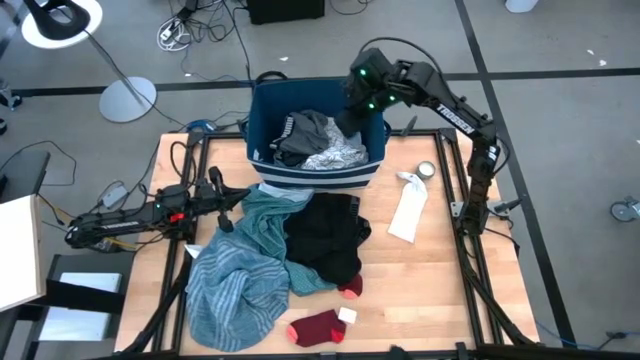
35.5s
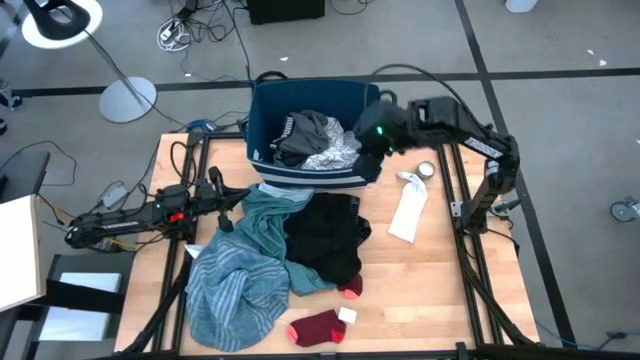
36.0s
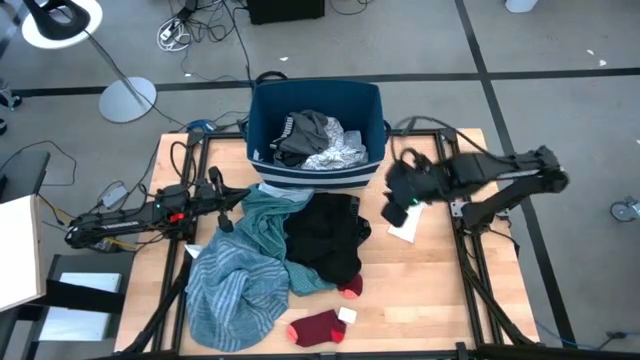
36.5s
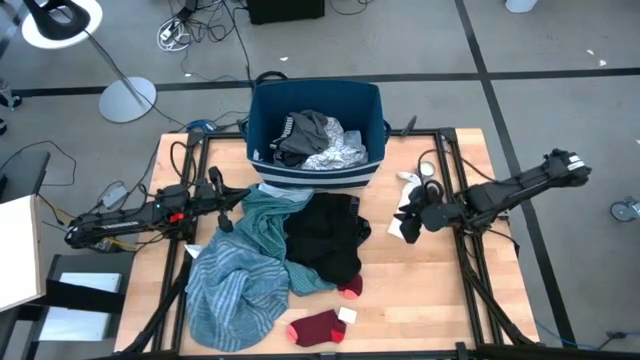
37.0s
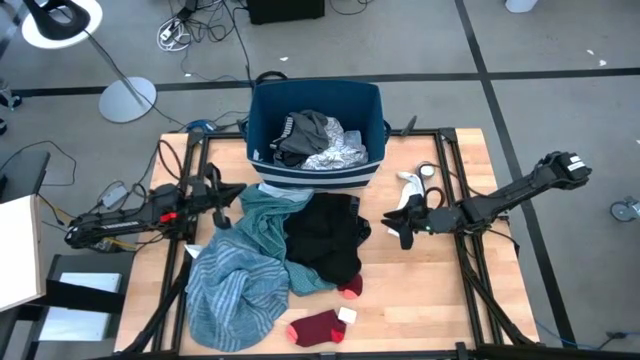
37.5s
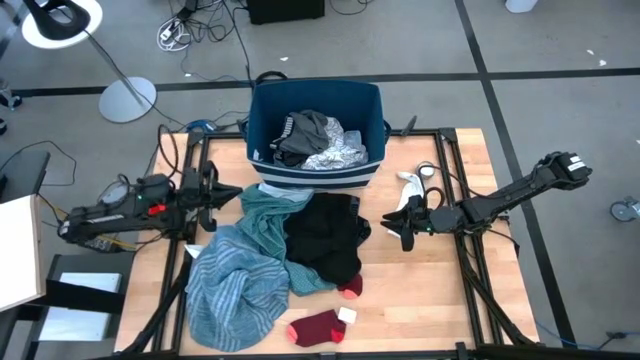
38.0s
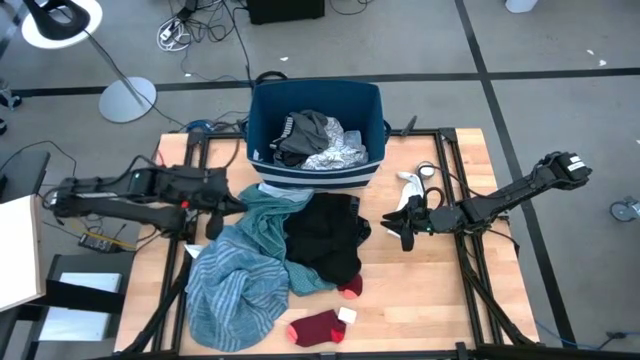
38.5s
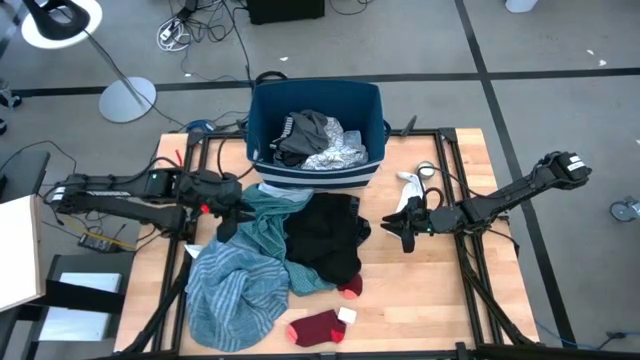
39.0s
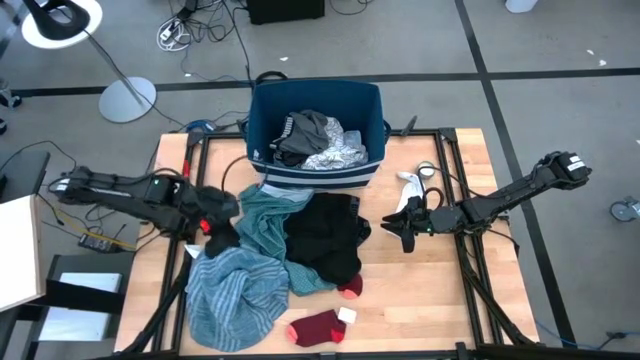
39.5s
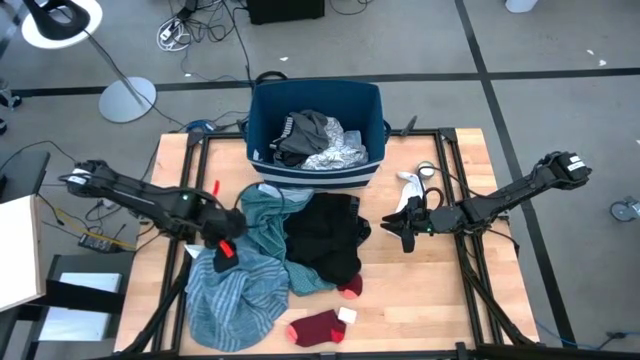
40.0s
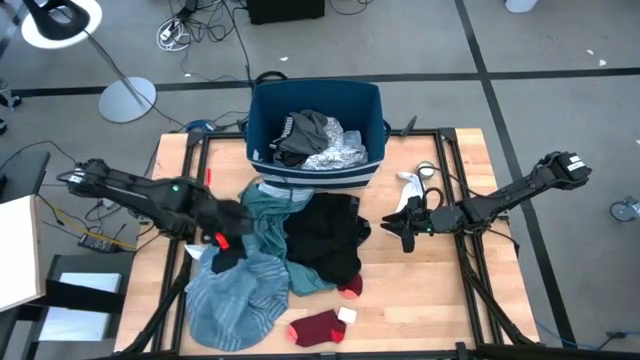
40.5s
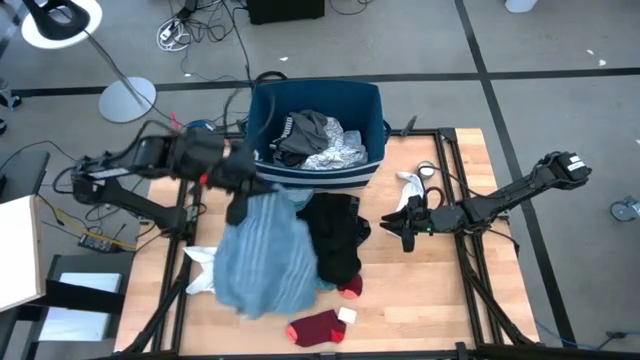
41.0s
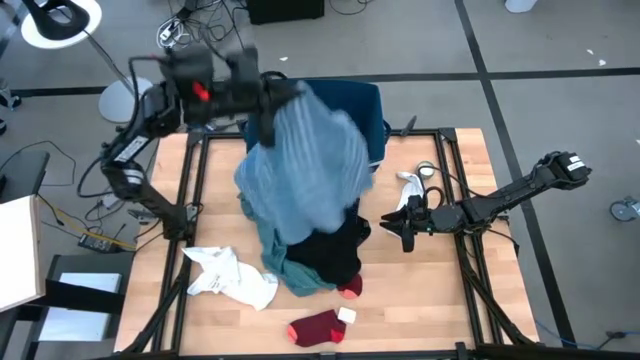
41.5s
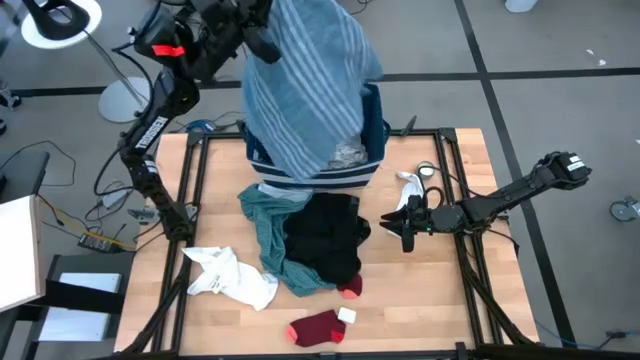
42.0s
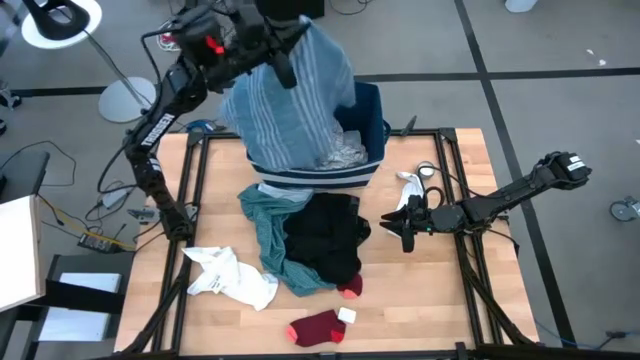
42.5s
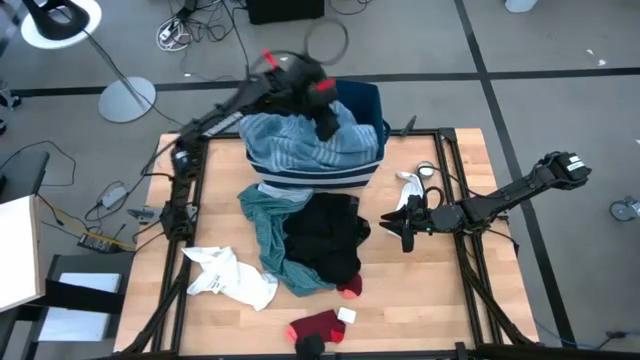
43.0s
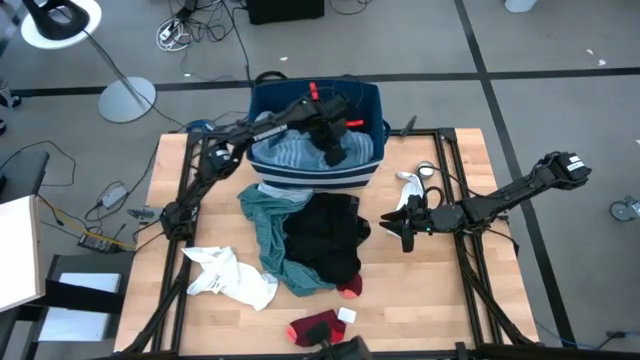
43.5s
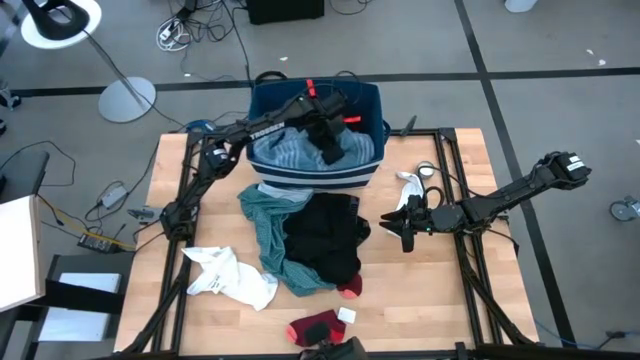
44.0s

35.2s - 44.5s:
Task: Sort clothes
Put the blue shirt into the blue laundry bin

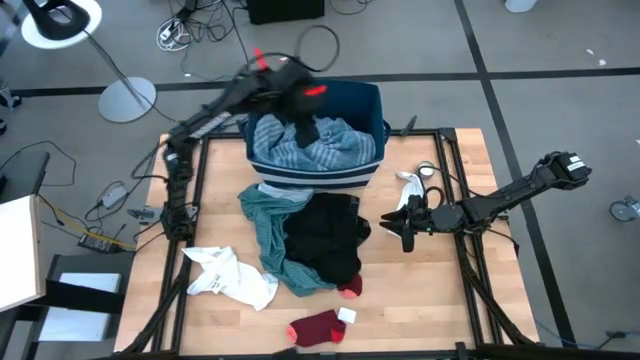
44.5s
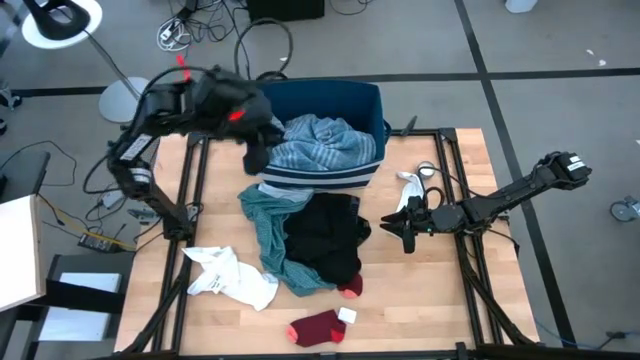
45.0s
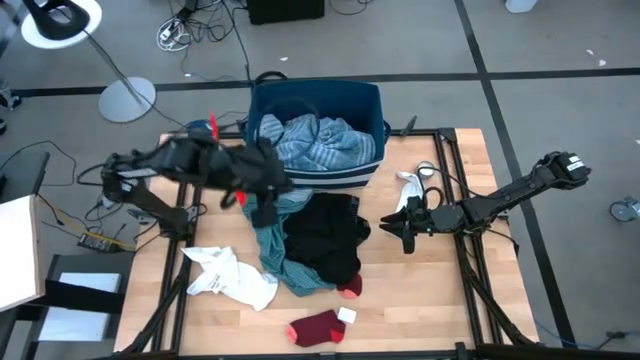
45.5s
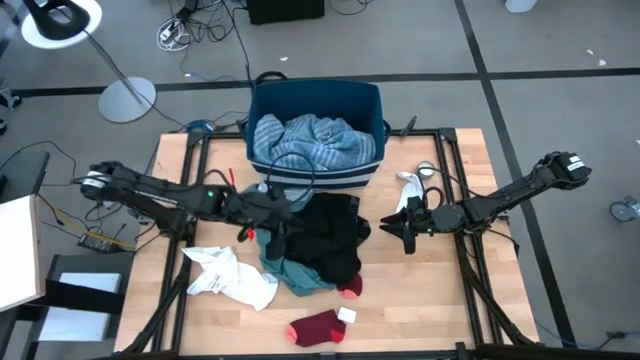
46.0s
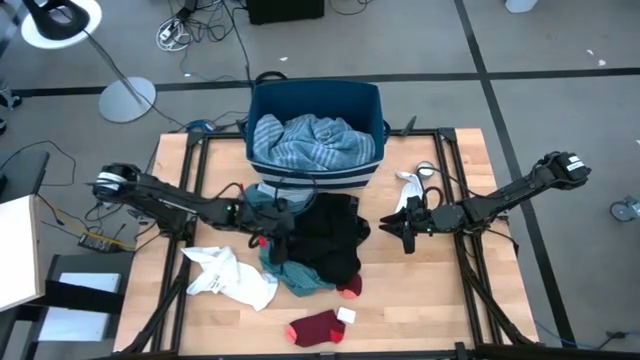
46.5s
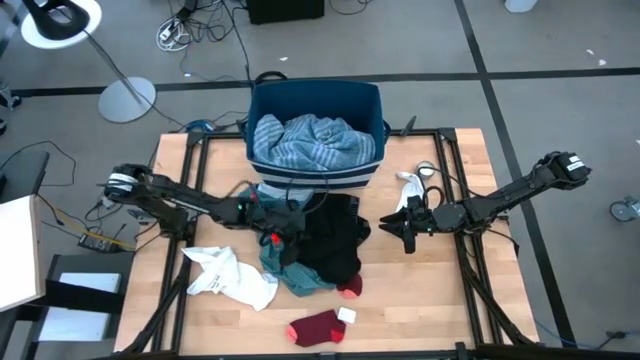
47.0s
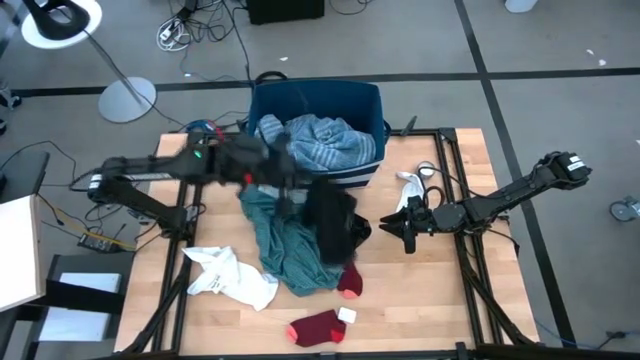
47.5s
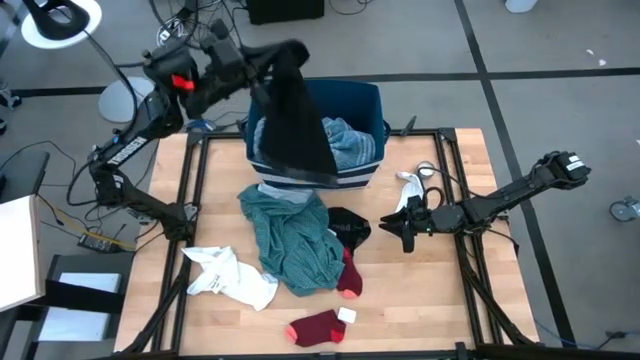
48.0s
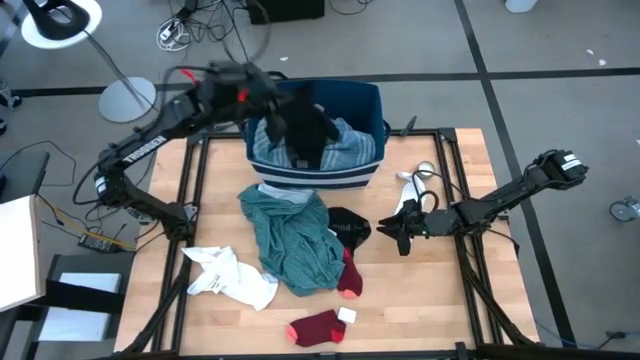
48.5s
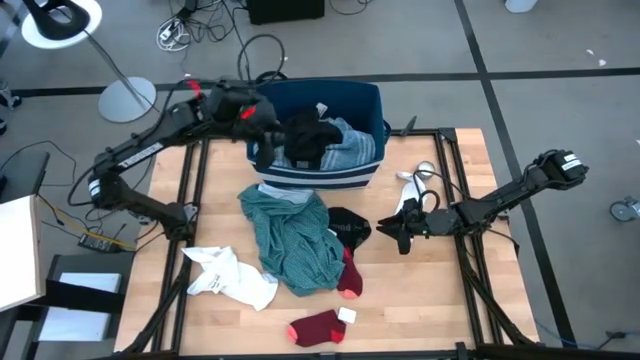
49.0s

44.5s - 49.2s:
Put the black boxer into the blue laundry bin
